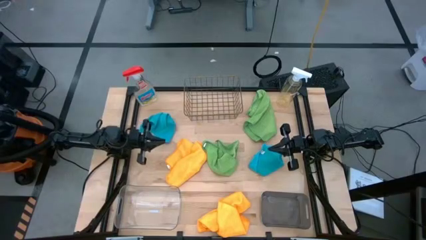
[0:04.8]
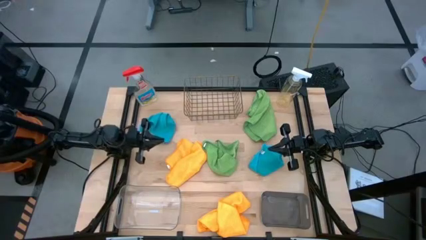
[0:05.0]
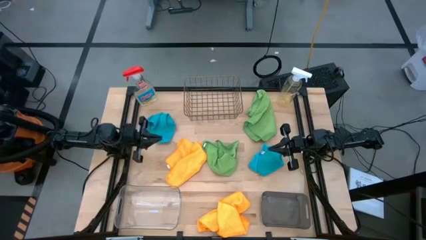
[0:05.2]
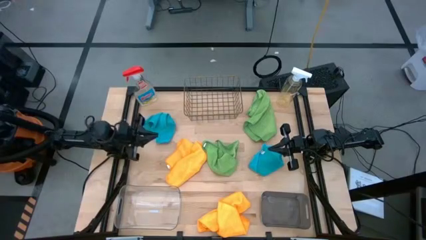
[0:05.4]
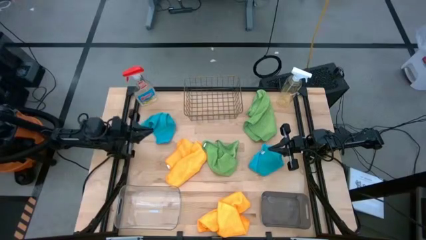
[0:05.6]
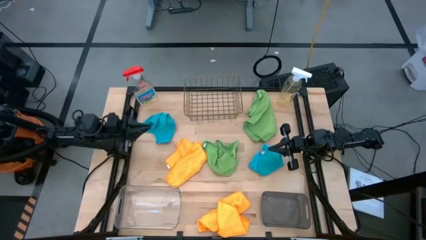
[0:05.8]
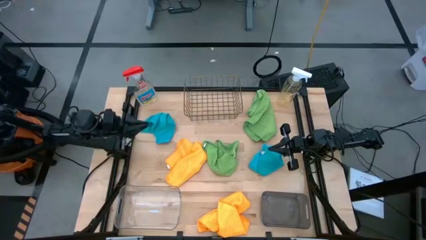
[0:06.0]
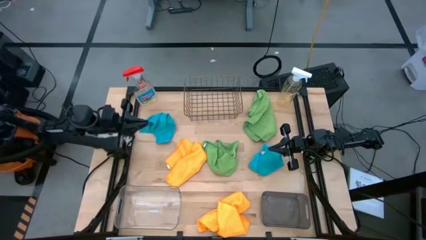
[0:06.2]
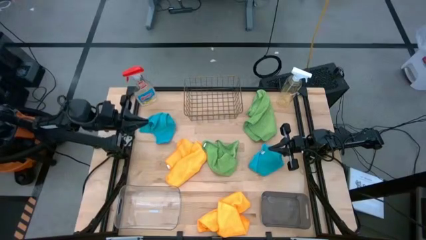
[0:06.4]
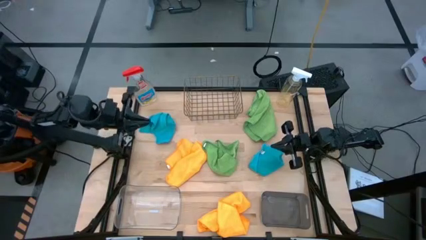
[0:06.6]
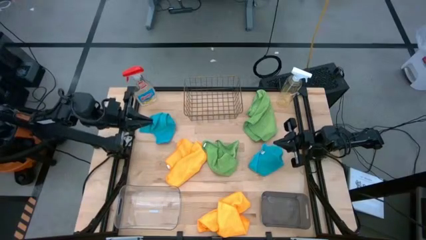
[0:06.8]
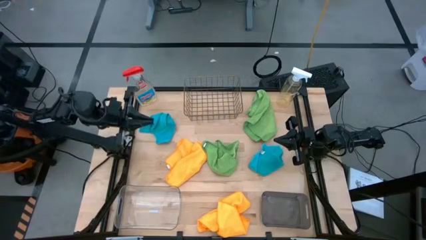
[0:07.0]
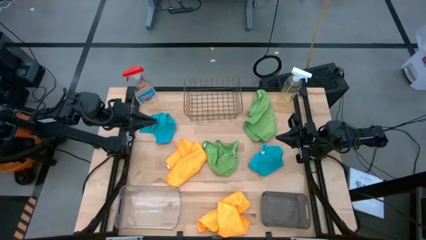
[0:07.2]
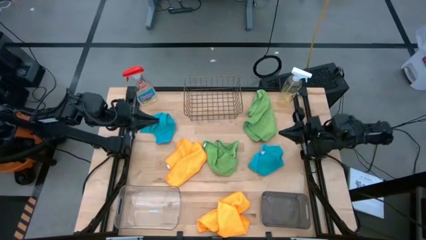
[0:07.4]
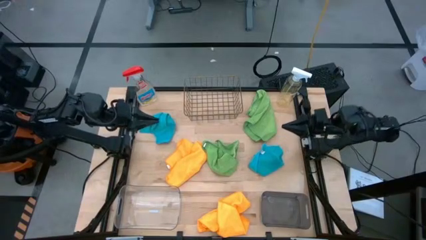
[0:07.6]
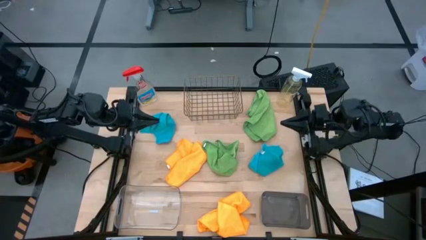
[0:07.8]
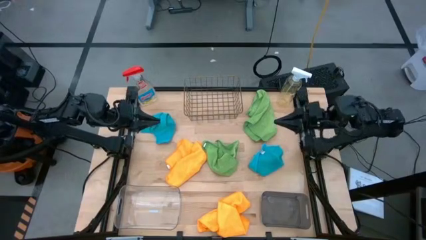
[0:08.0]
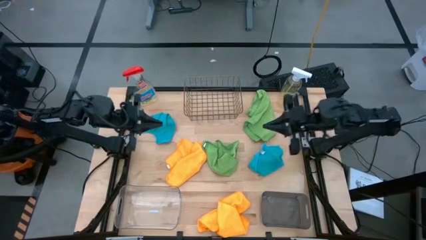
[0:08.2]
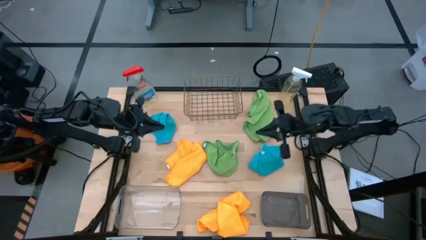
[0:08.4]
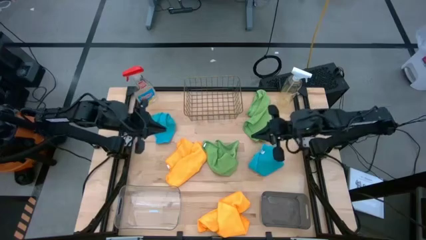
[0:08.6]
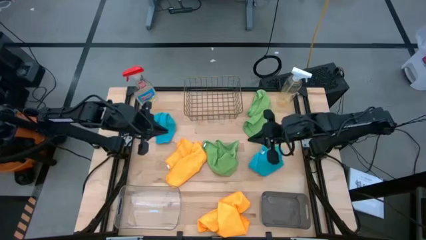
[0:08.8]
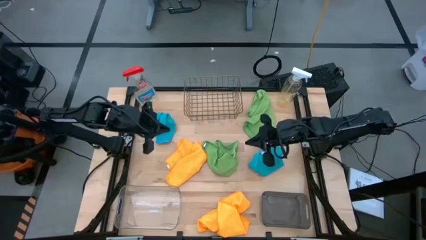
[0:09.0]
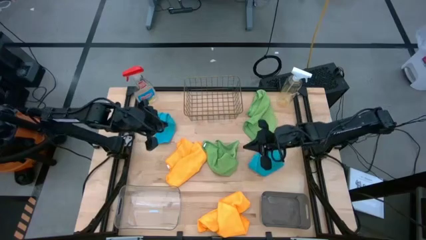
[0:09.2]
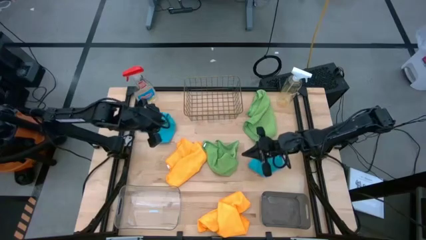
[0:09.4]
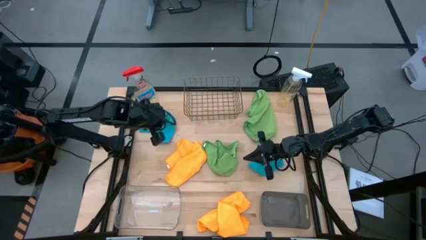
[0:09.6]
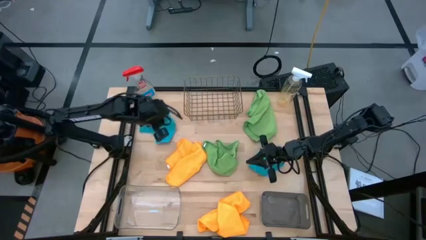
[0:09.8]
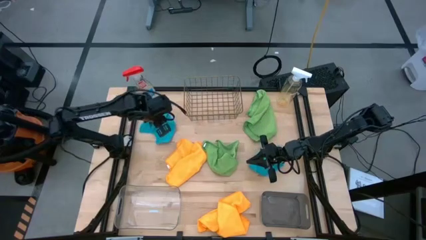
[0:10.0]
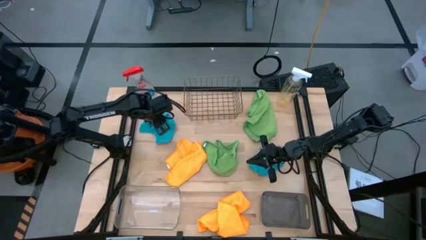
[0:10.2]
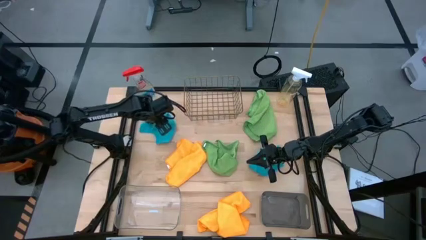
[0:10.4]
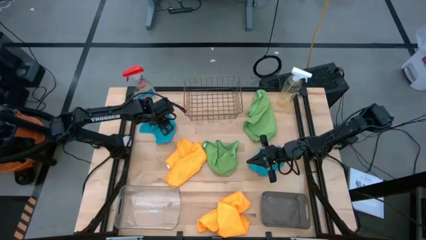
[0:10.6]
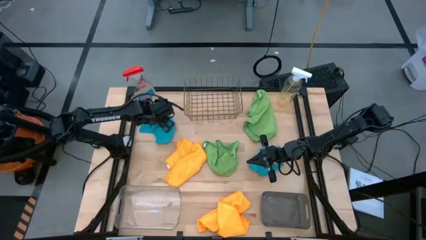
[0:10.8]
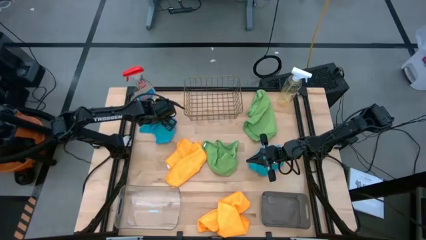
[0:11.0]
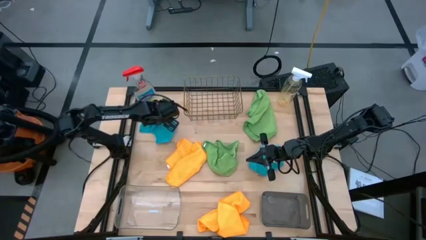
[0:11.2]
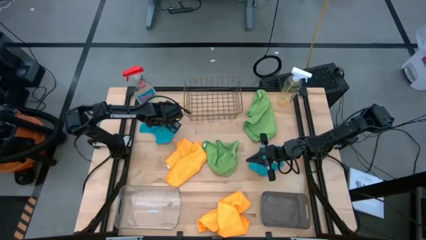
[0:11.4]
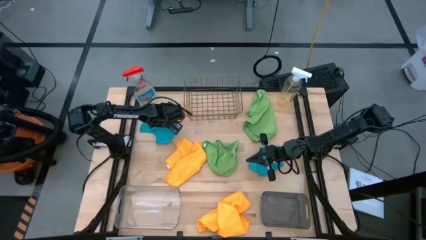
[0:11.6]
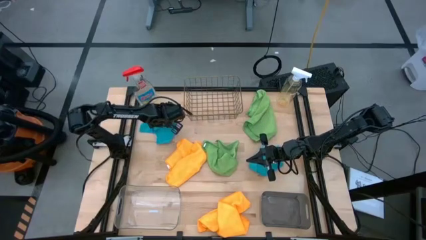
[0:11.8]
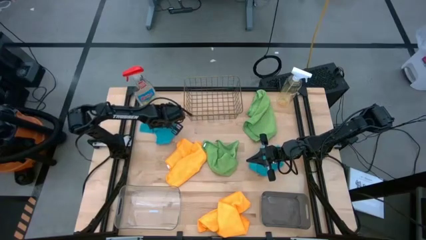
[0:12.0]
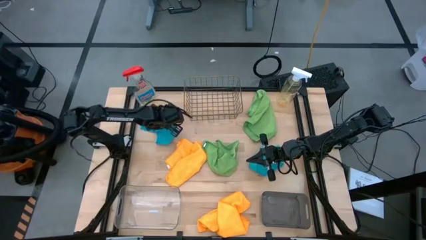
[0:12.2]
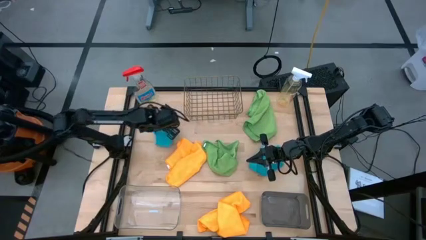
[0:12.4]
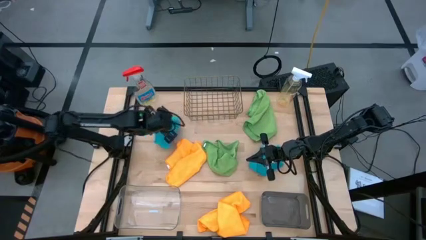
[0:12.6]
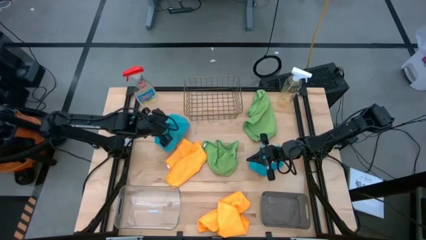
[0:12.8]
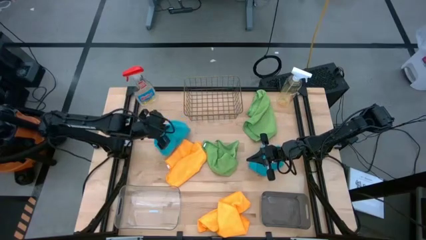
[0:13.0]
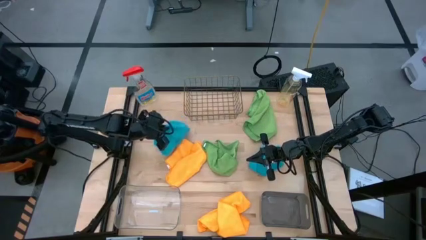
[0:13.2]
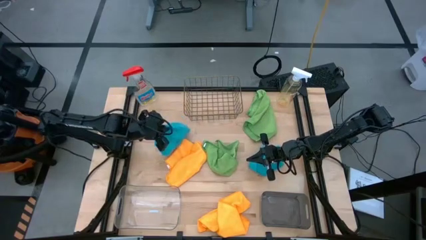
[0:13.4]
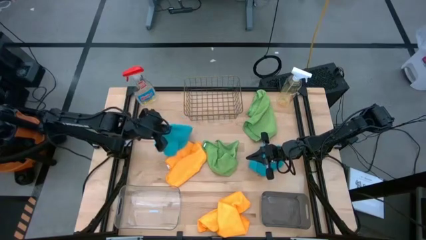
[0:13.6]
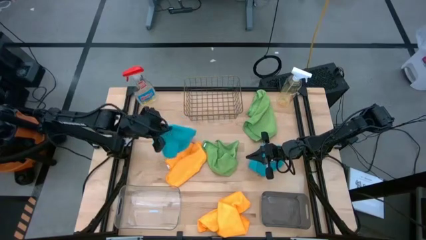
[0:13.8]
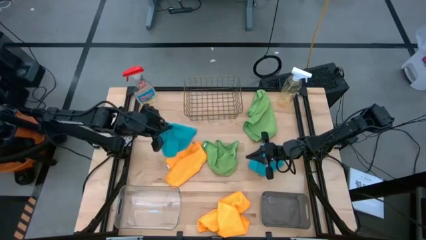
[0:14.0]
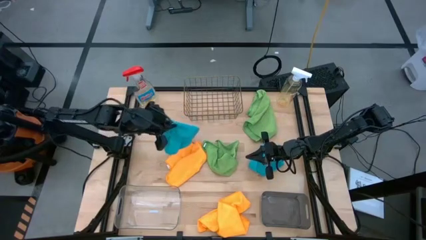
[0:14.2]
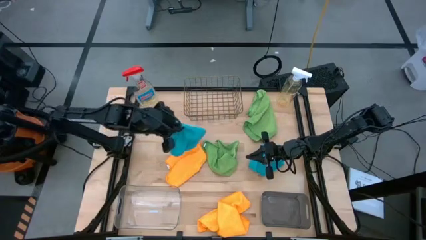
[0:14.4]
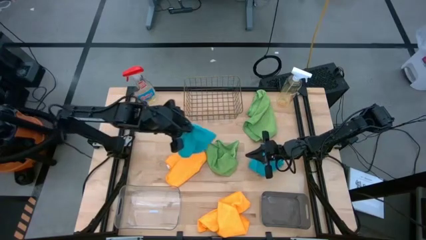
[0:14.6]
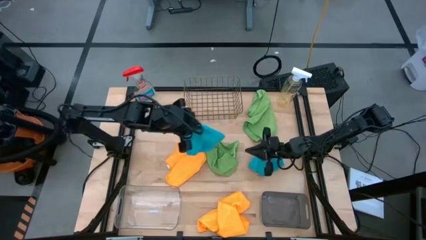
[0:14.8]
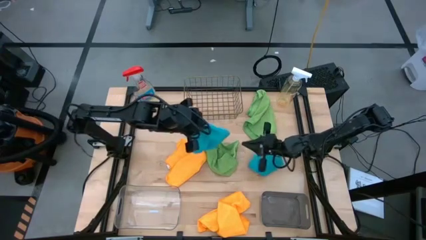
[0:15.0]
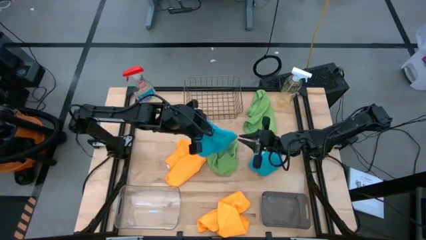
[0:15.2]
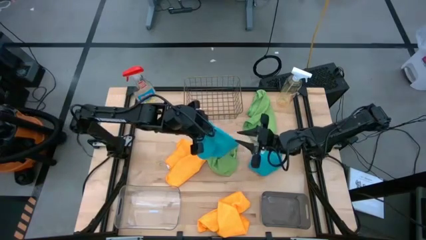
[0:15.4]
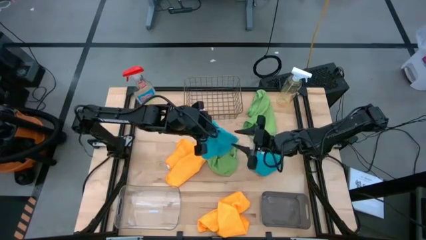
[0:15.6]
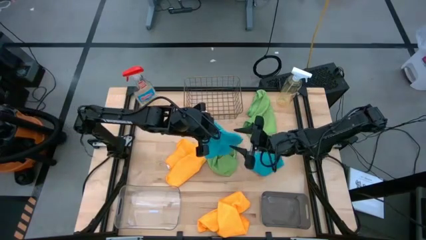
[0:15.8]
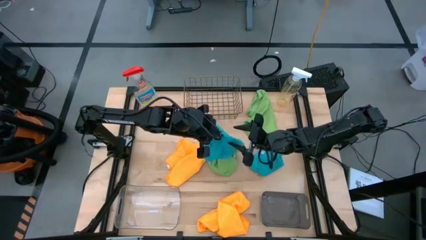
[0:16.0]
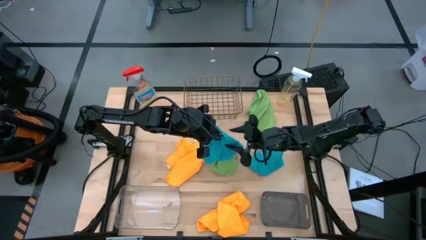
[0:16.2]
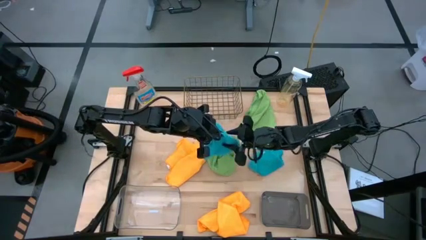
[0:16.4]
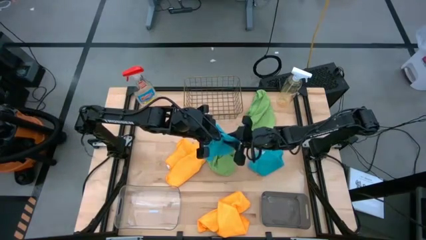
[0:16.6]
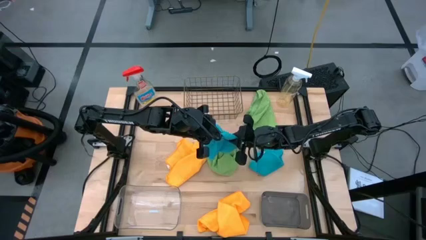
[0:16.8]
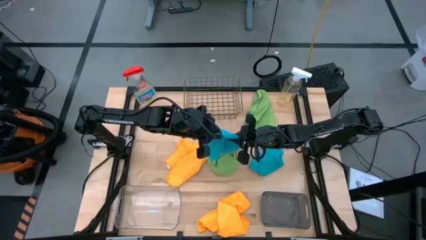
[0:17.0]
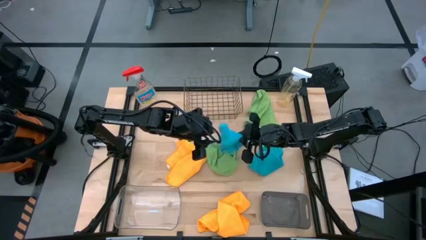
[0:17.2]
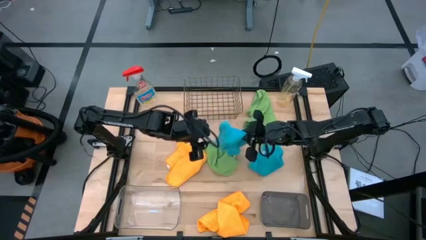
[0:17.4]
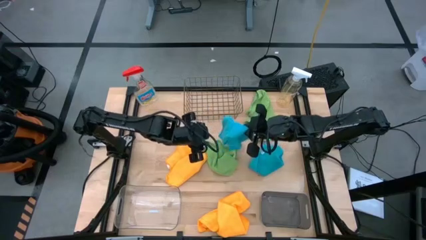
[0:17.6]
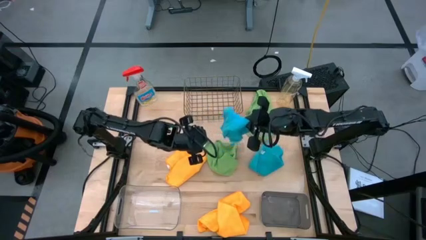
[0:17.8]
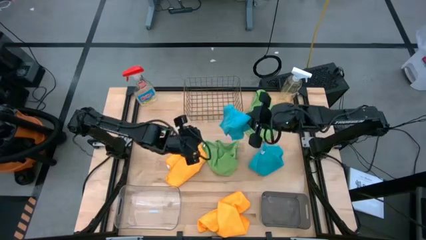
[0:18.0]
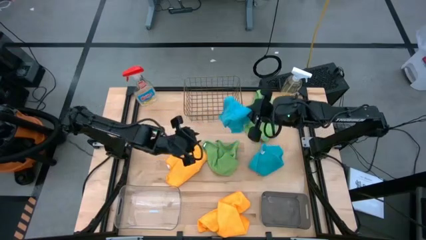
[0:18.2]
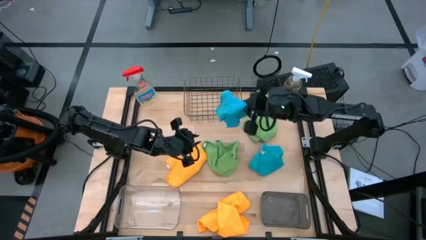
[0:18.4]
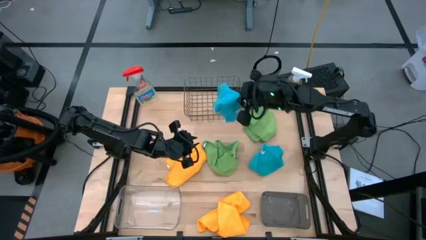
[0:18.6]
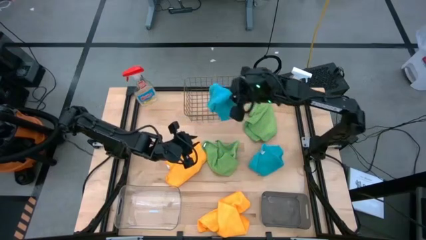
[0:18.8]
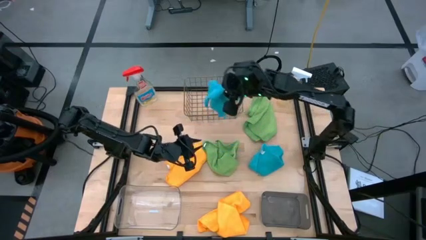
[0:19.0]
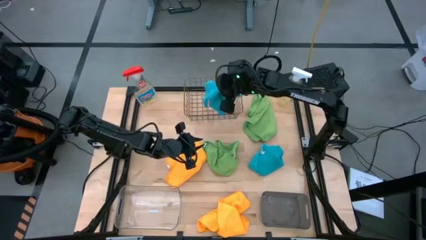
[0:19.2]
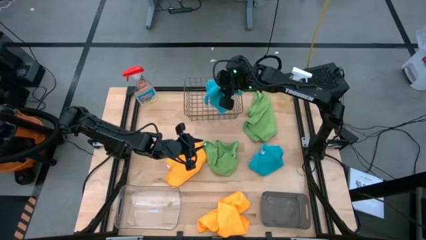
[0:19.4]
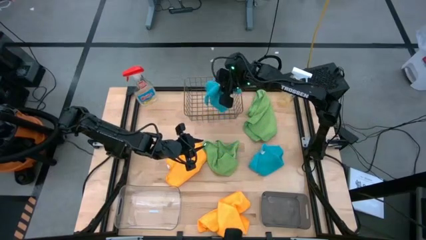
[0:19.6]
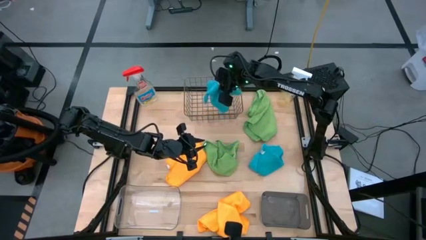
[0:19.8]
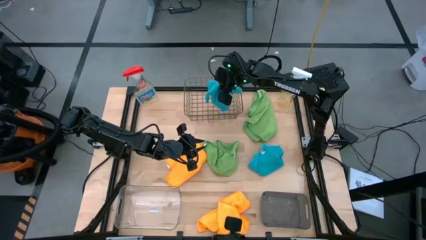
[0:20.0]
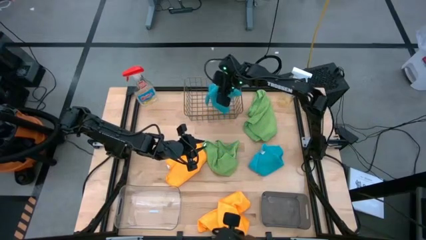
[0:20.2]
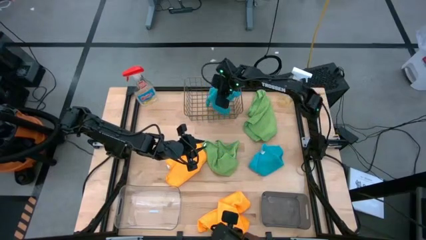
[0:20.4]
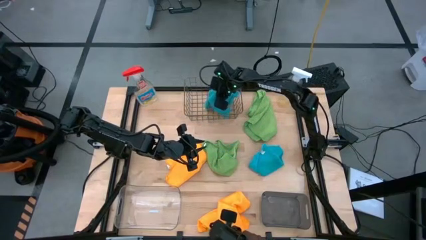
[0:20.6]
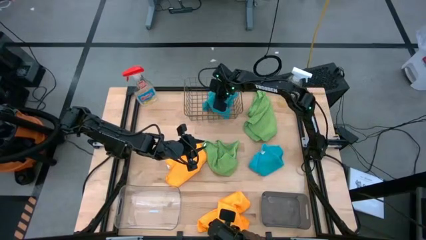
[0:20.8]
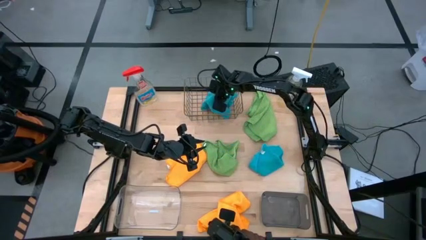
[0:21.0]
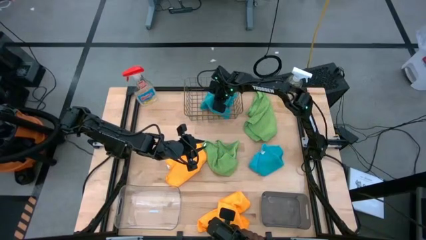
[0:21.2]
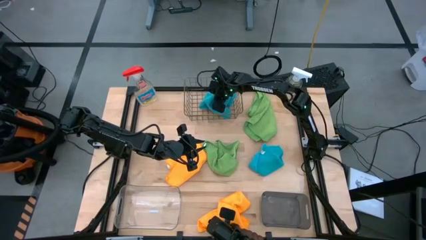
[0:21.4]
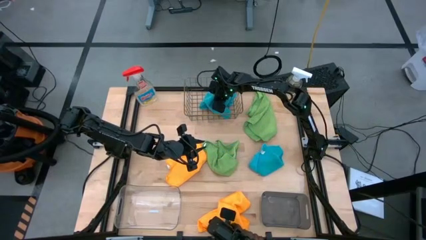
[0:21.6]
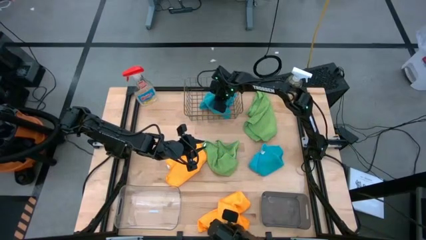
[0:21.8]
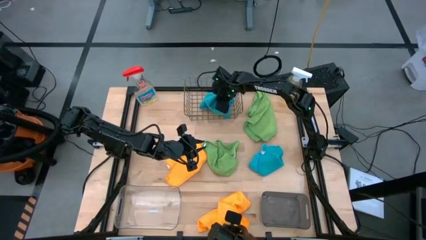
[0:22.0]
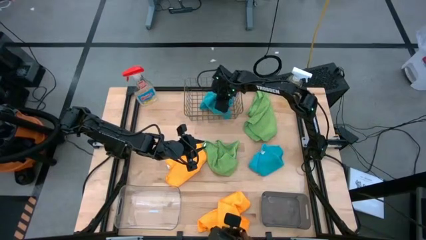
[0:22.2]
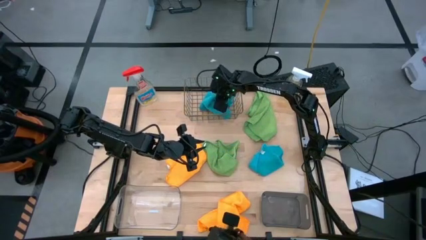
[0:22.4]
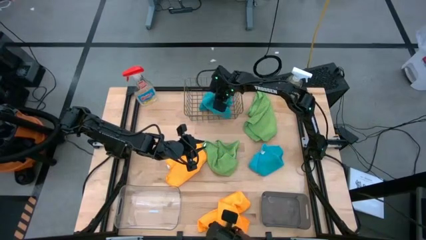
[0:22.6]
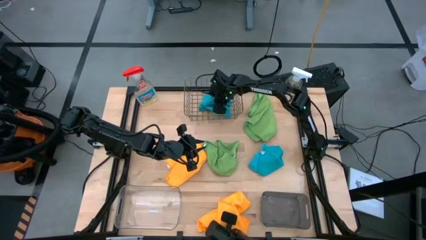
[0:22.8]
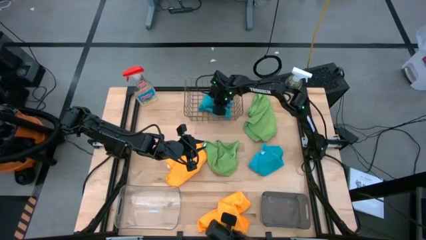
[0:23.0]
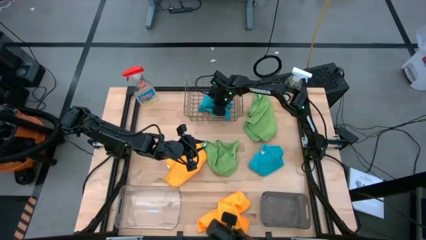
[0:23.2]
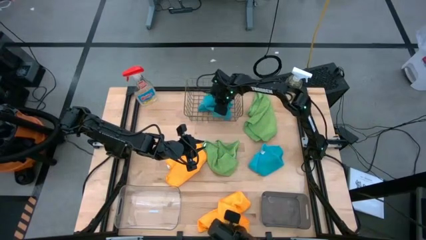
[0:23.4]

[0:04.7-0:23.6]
Task: Sort microfiber towel by color & place in baskets
Put the left blue microfiber cloth into the wired basket
